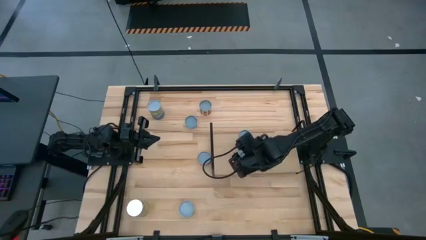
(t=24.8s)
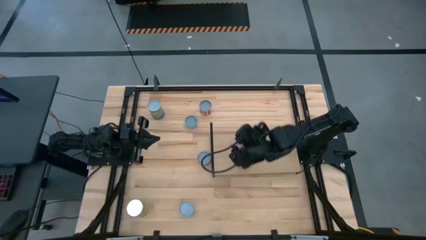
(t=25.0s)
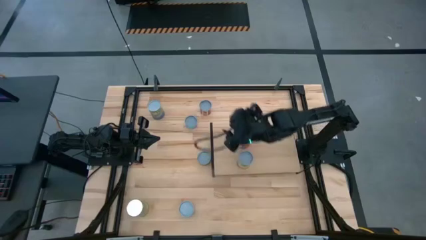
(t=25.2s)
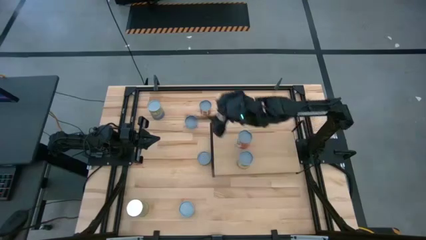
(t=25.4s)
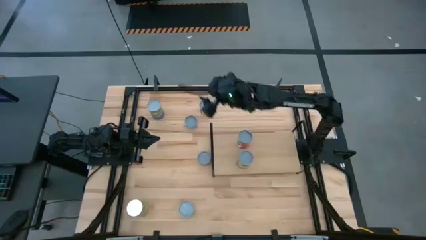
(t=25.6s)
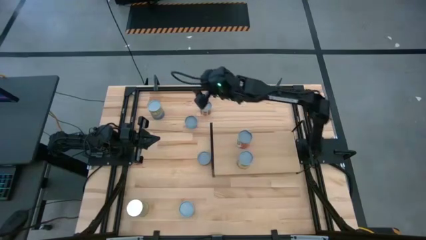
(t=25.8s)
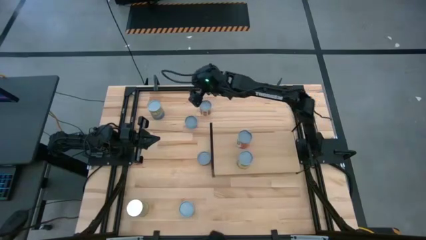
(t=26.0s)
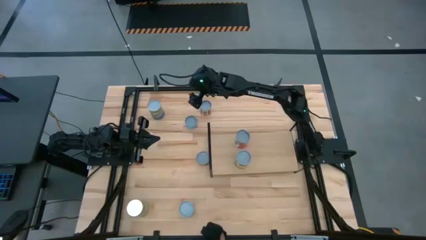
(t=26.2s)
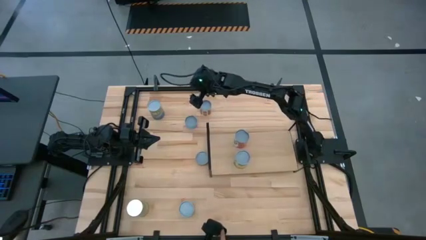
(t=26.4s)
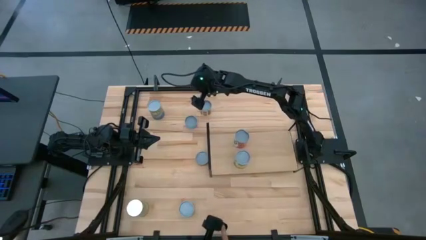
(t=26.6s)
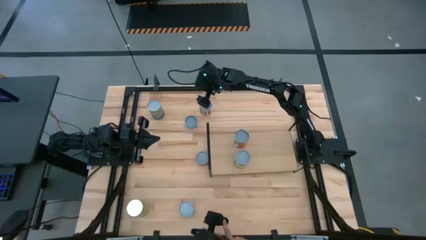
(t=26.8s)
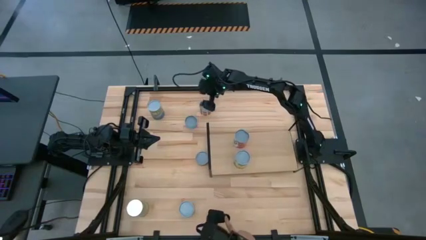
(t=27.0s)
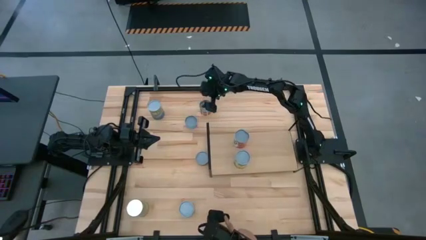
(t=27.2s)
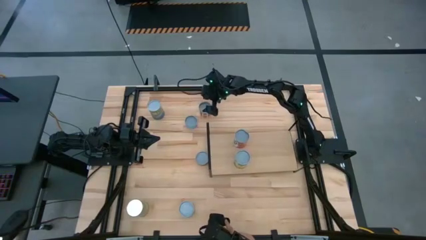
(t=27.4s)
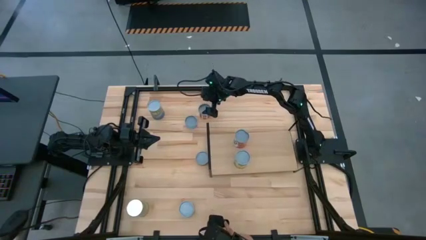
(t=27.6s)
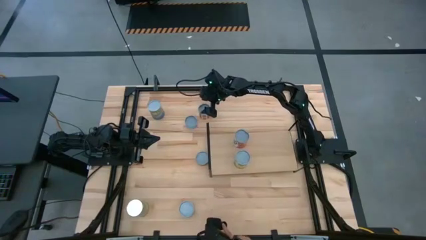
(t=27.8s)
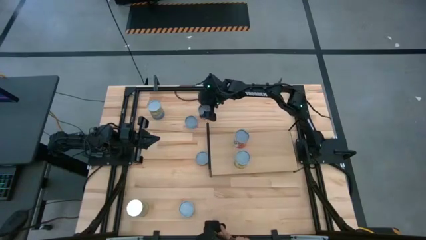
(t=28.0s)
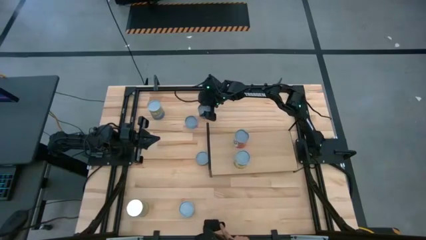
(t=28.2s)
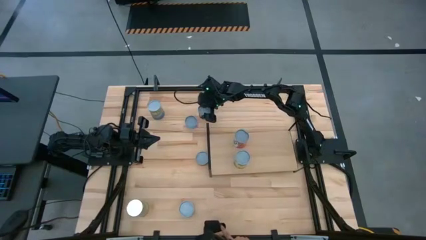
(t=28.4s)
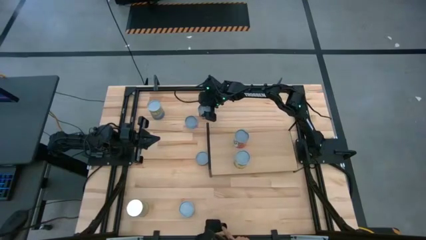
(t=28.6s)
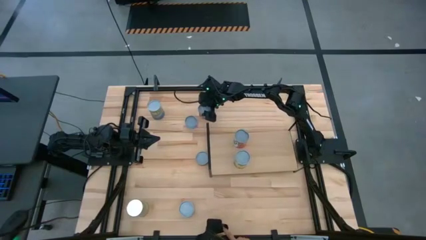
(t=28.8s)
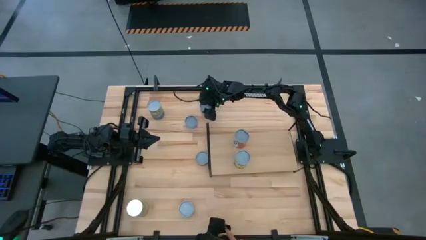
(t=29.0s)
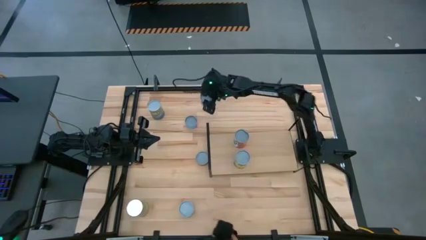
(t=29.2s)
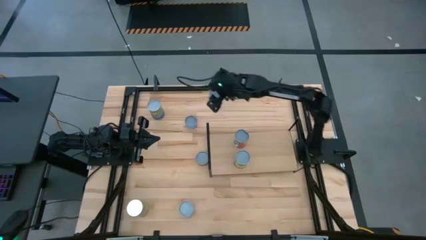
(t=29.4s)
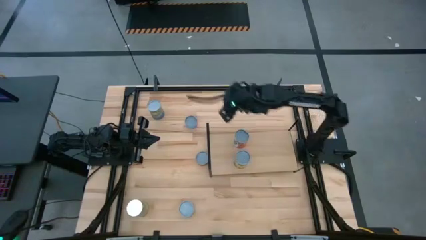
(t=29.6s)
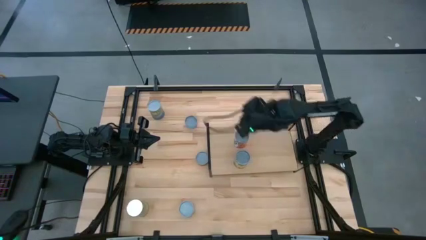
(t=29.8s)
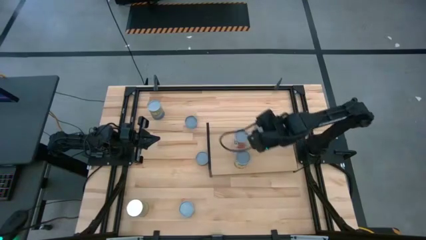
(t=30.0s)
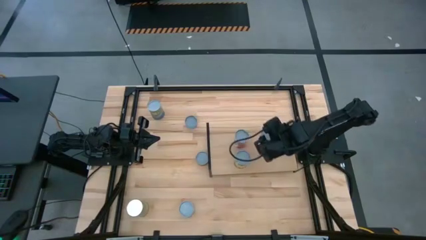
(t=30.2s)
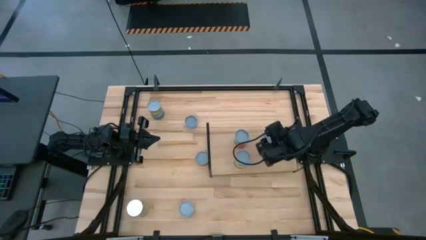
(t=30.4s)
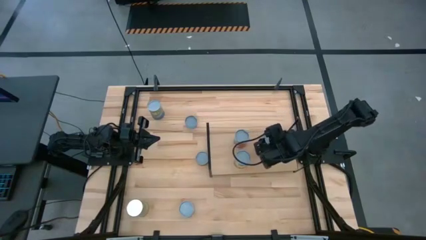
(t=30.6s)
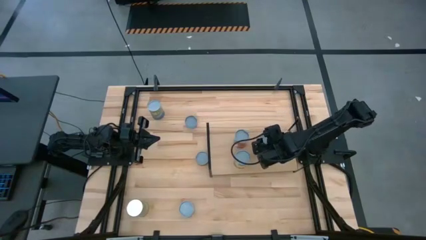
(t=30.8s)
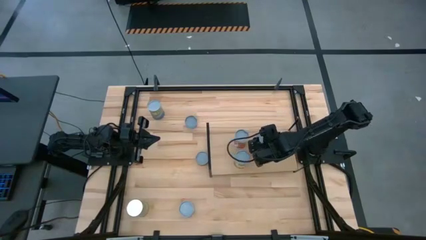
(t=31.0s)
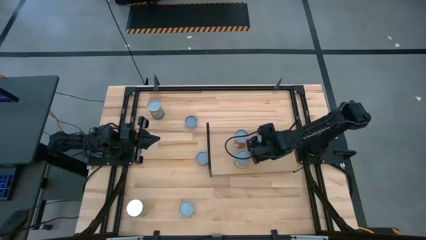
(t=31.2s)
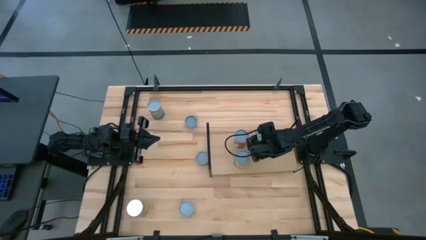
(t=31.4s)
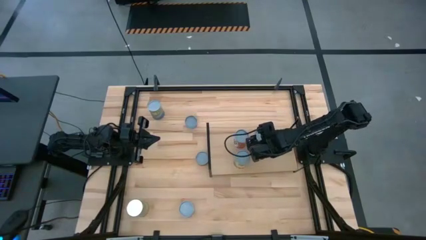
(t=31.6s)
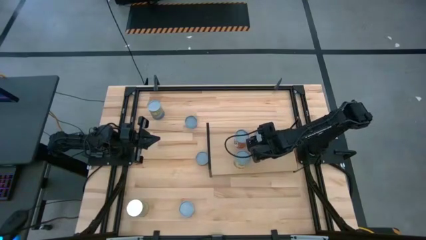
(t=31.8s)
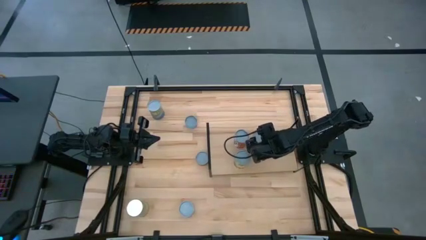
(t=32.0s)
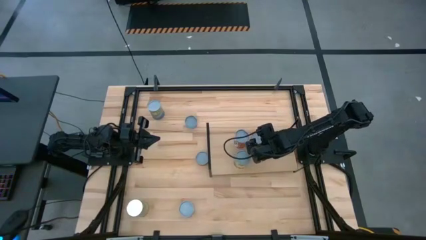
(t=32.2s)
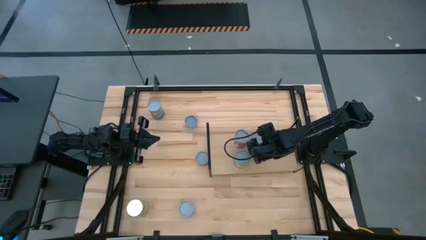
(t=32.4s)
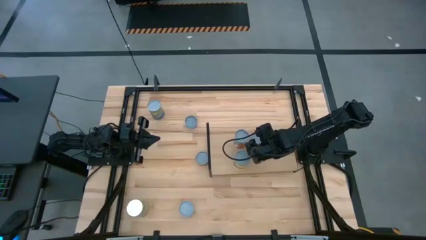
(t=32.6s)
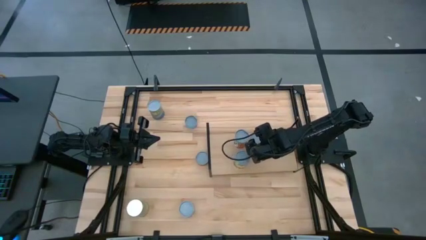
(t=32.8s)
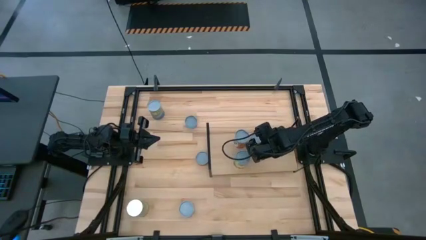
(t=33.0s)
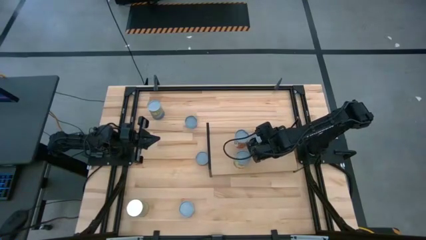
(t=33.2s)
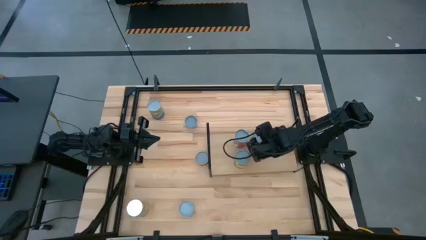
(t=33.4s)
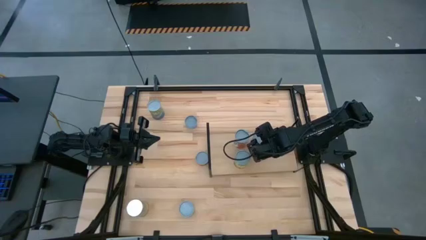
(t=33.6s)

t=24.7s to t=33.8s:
Task: Pick and place cans onto a shelf
Put the red can on the shelf aligned with the light red can

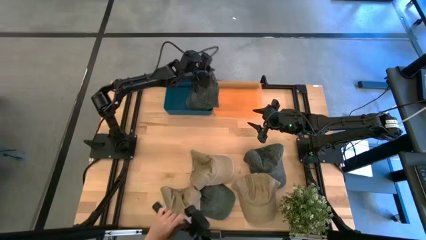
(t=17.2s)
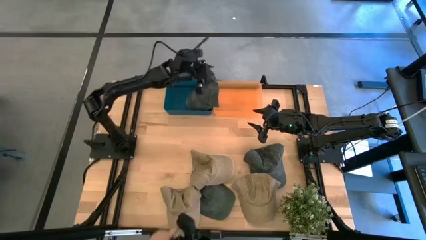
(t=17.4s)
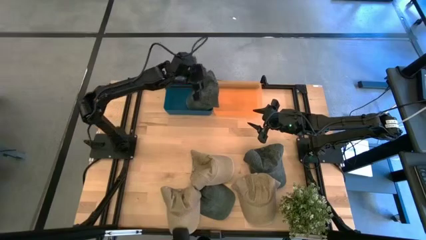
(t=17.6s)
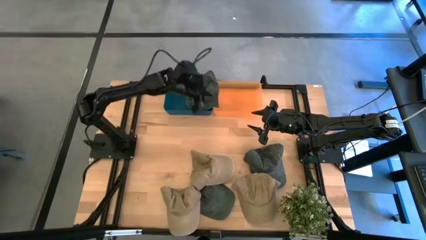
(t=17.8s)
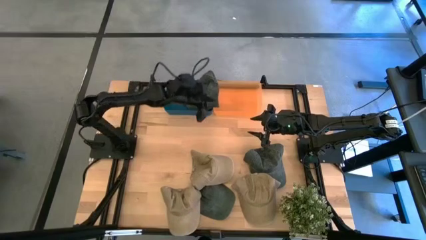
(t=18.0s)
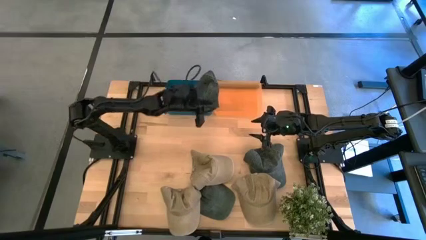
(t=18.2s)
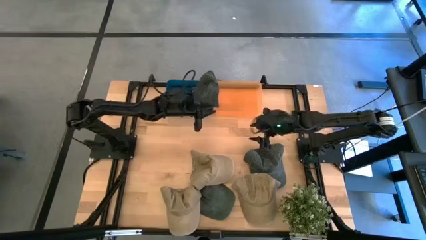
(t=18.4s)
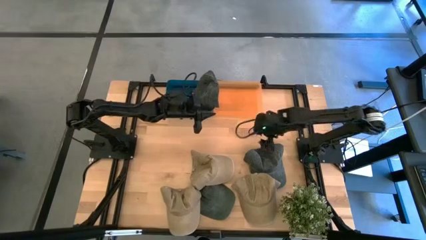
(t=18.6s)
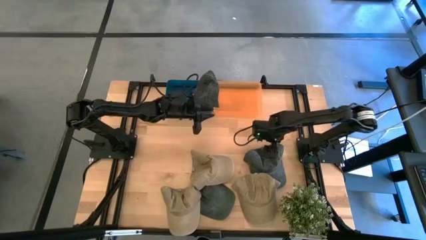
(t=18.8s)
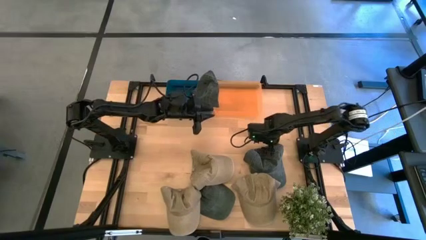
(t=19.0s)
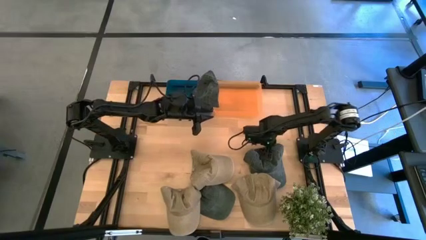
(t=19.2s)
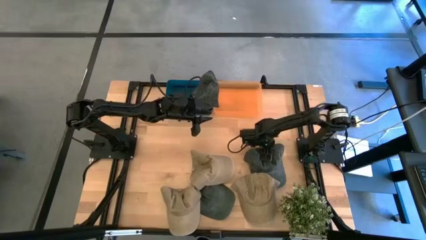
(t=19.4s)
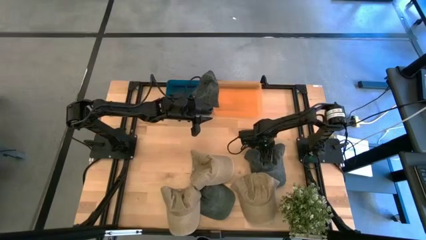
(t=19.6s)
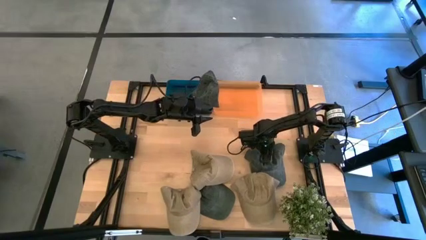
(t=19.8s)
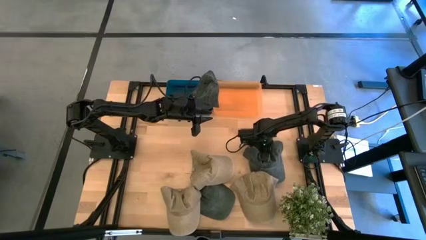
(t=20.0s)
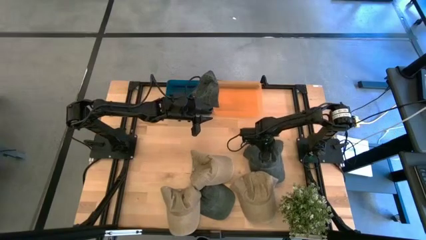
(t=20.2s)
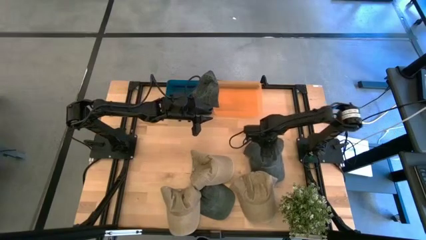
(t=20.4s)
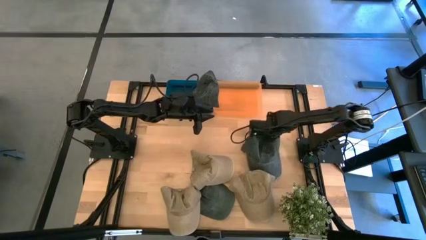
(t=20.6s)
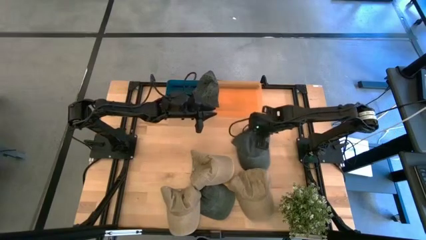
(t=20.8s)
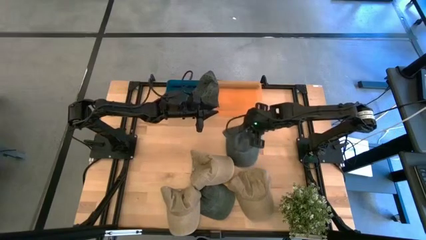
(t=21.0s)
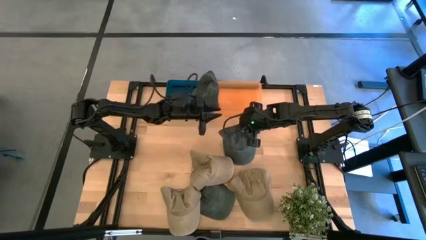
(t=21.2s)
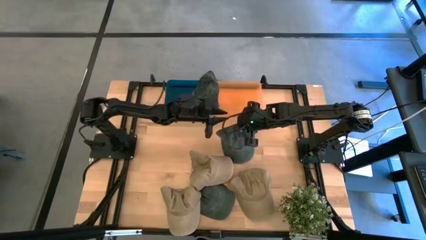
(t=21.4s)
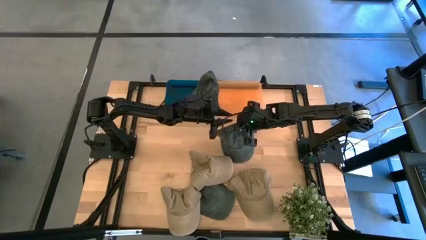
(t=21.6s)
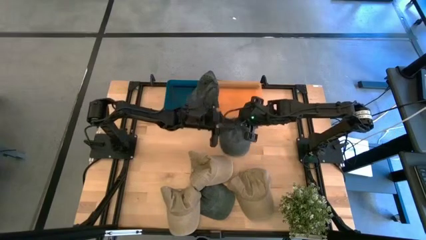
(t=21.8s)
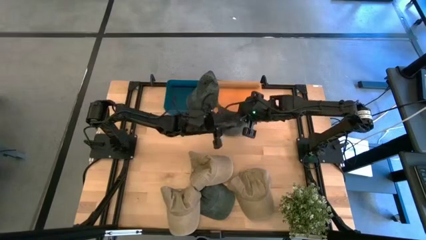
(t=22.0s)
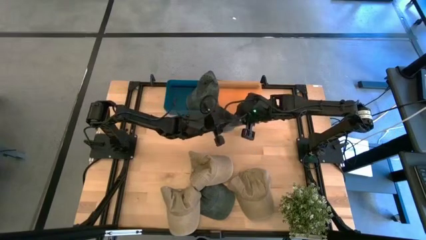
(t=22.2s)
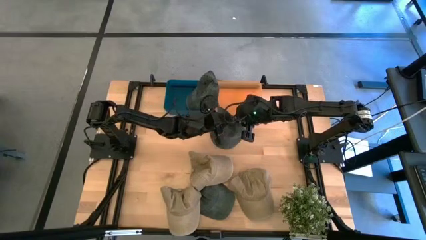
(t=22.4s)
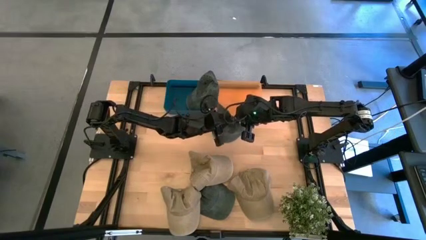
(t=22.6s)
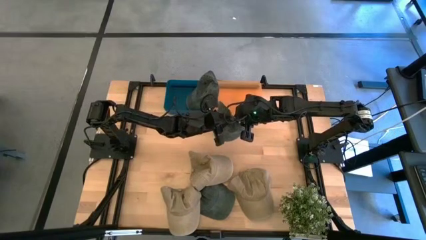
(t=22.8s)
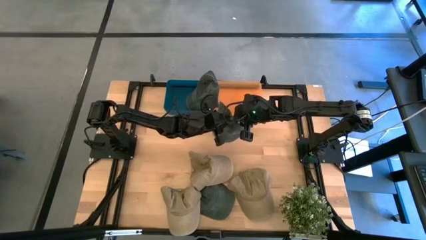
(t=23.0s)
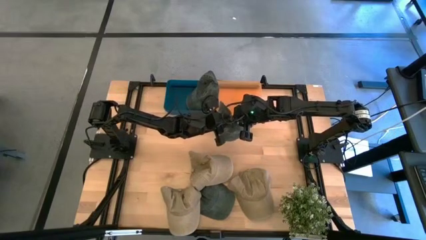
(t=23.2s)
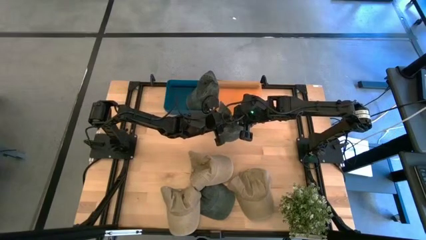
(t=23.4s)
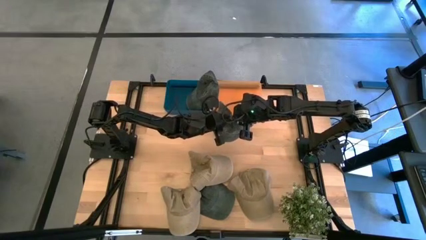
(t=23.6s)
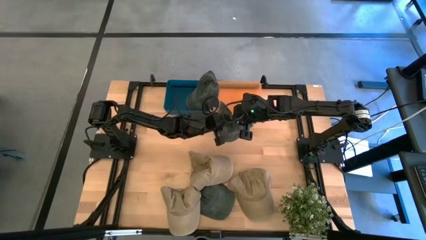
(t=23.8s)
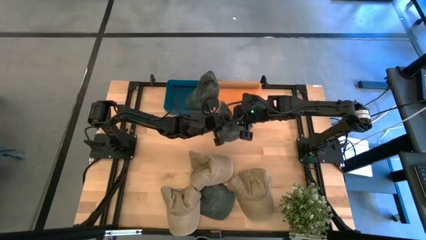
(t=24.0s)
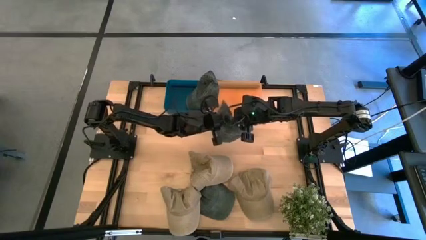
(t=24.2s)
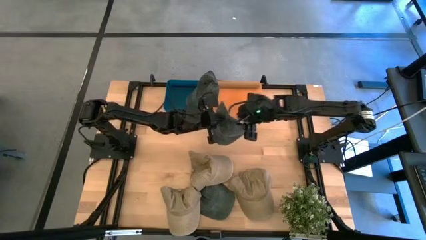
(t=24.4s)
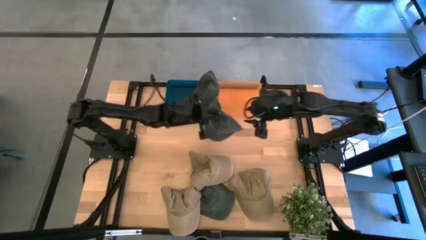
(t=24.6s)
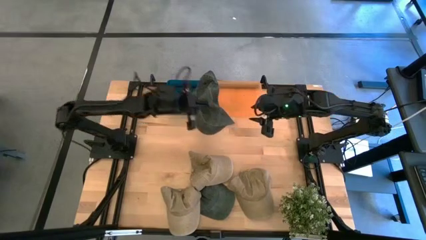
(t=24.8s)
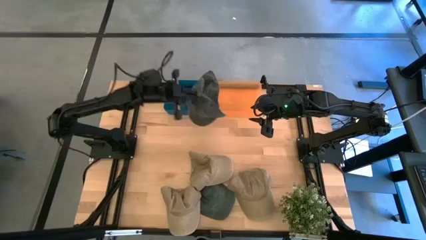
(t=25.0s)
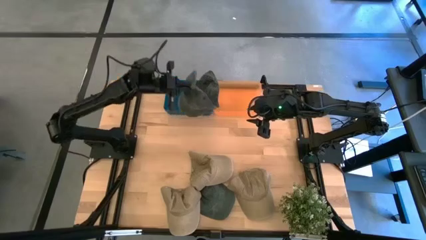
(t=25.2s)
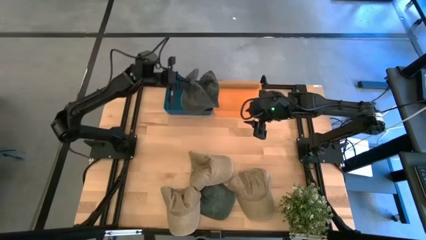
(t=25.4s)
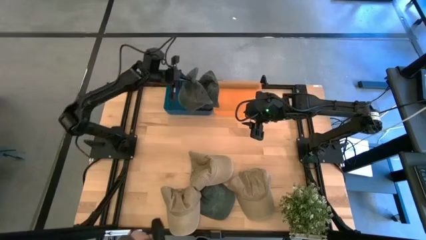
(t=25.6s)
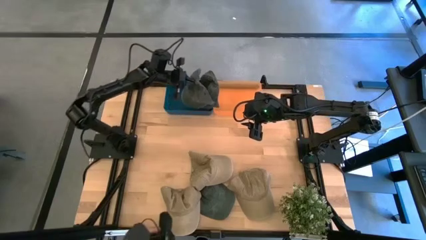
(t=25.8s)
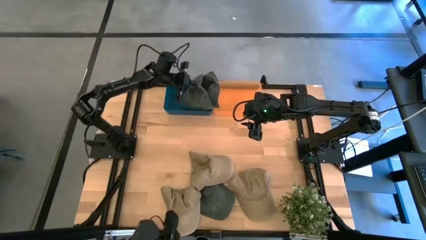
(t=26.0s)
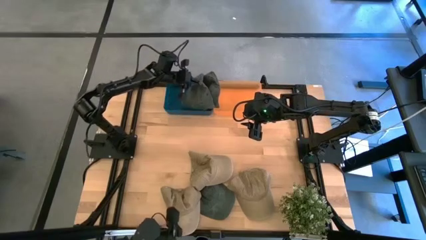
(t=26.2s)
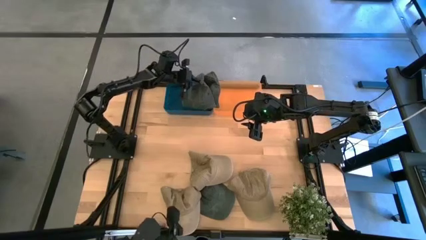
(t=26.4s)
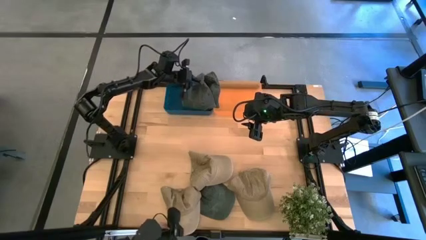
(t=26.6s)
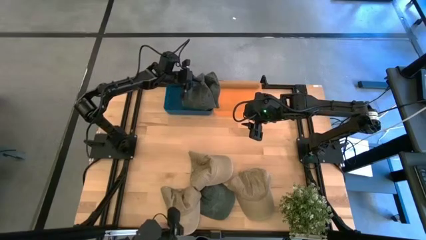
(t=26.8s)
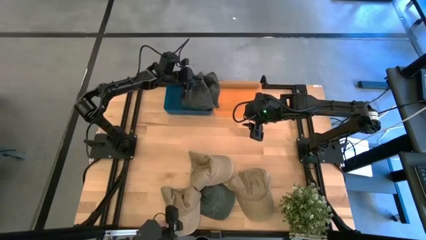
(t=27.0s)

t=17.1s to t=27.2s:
Task: Pick & Place hat
Put the top black cap into the blue bin
